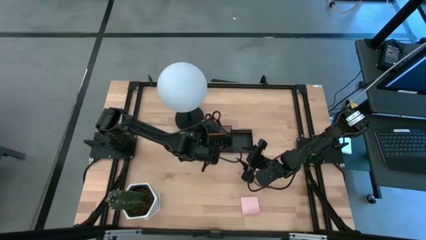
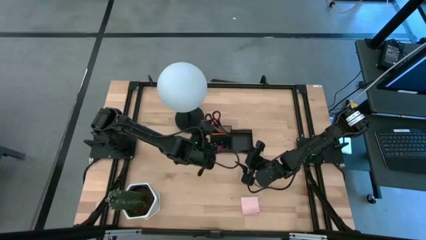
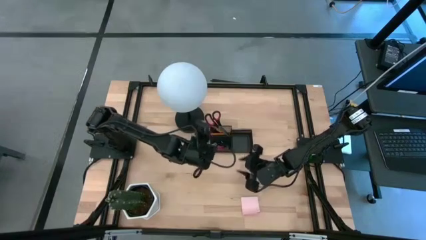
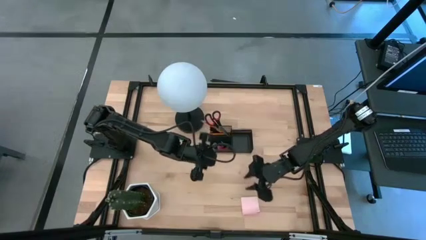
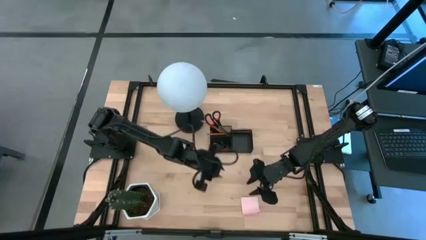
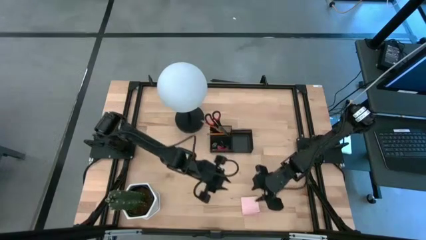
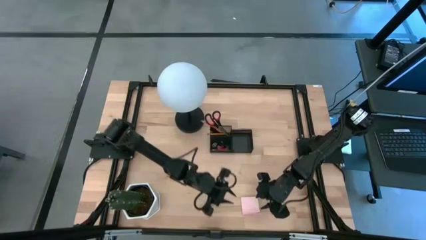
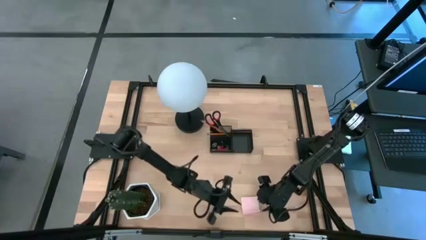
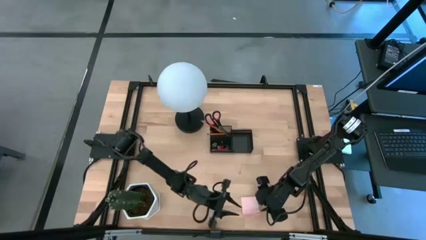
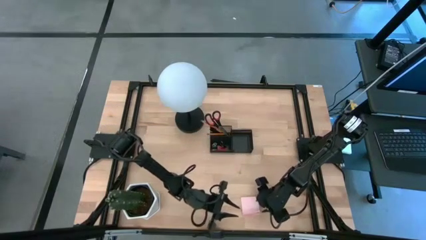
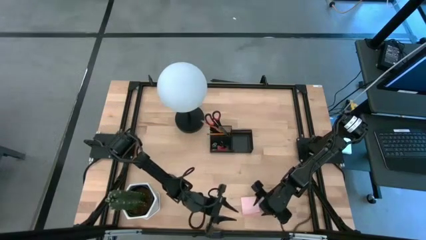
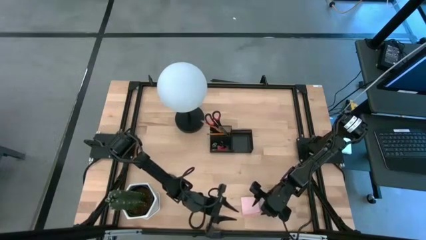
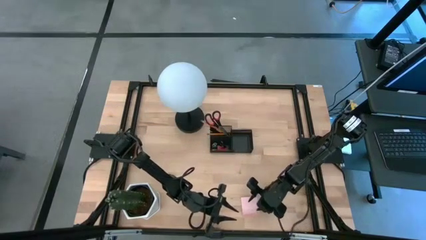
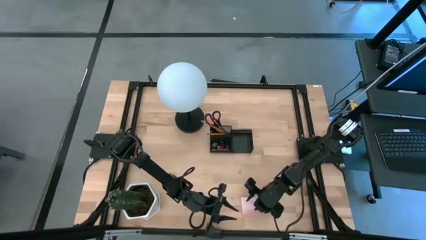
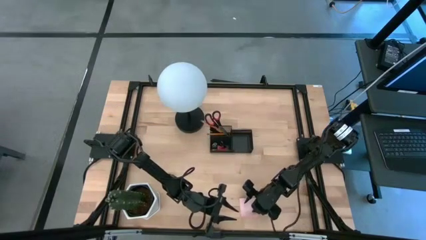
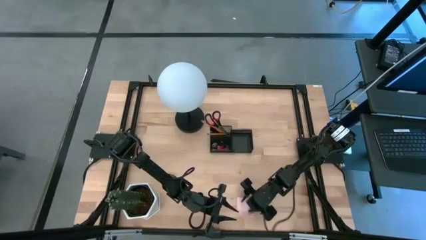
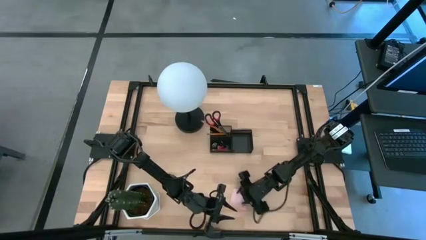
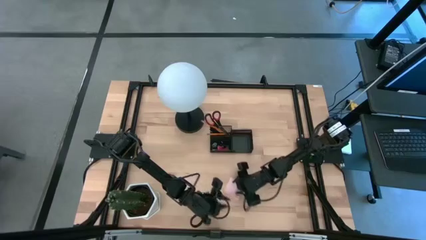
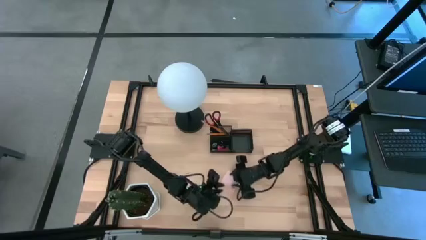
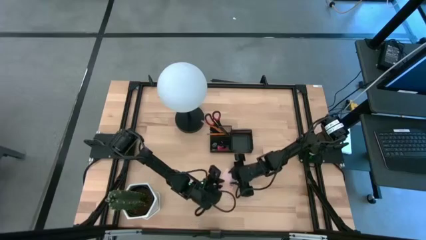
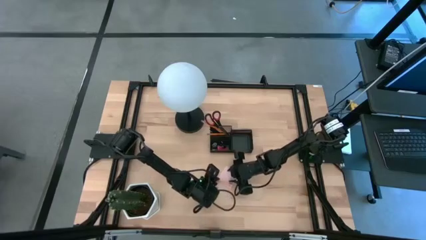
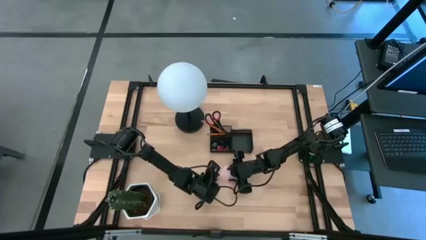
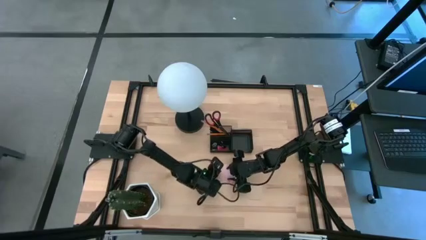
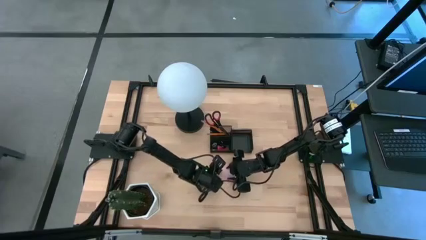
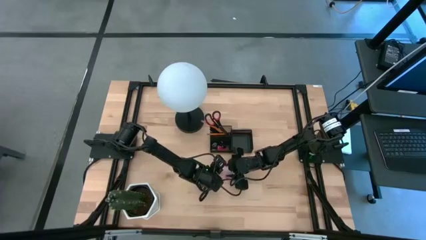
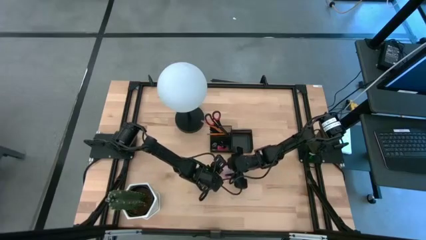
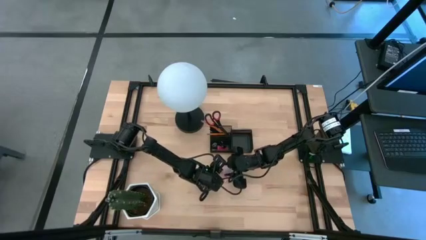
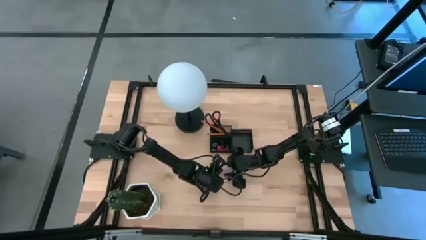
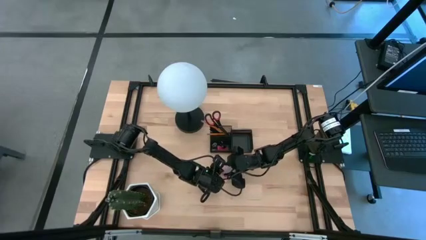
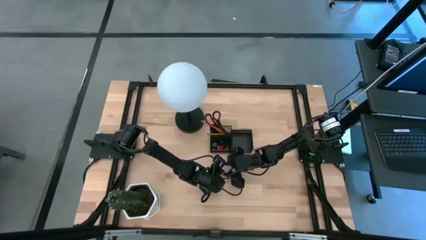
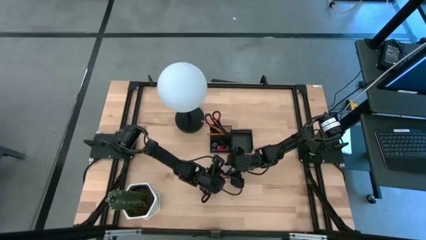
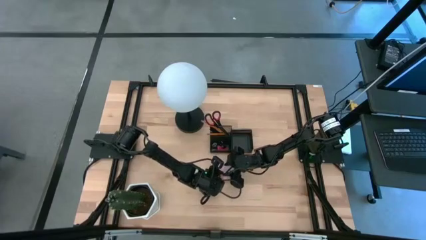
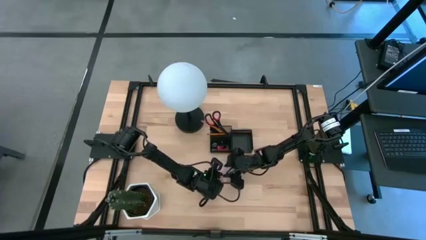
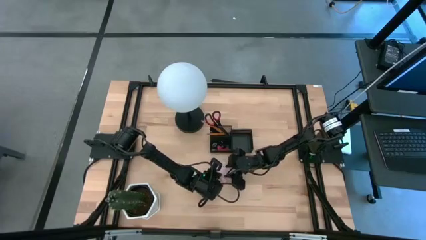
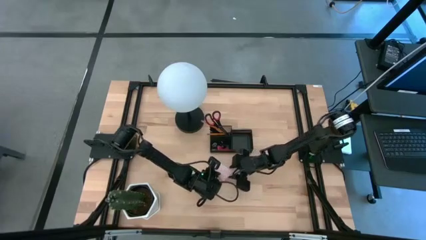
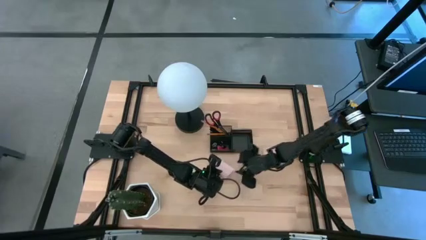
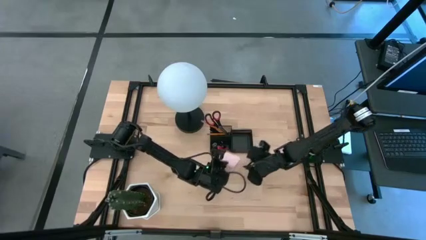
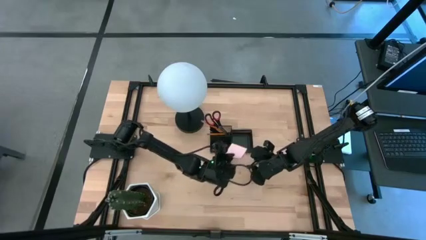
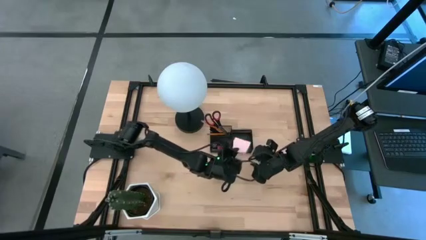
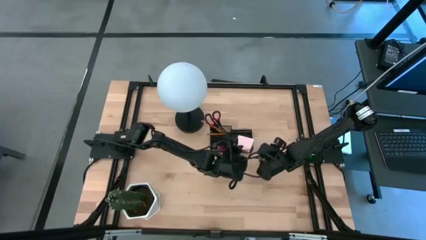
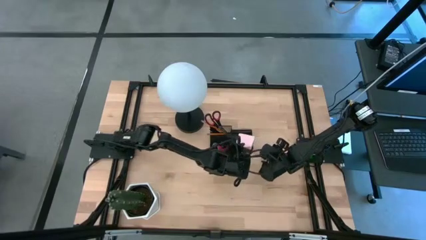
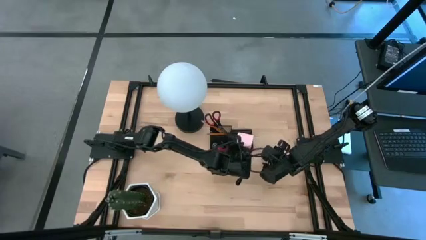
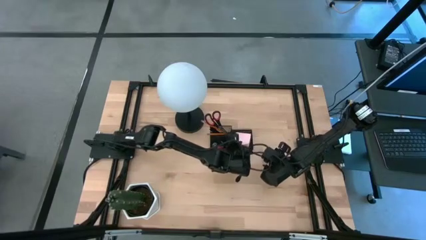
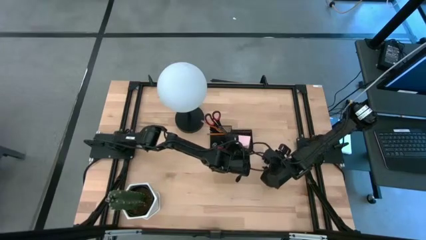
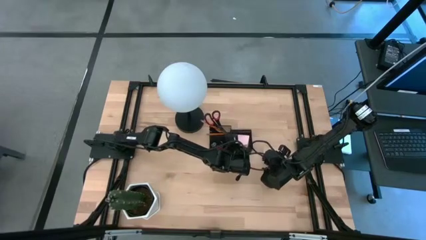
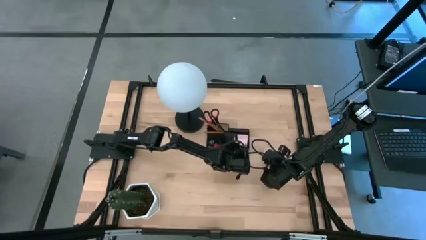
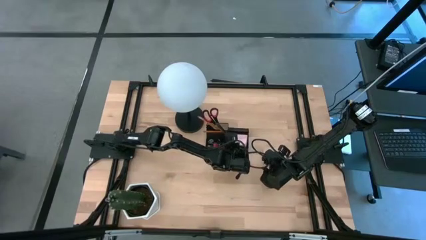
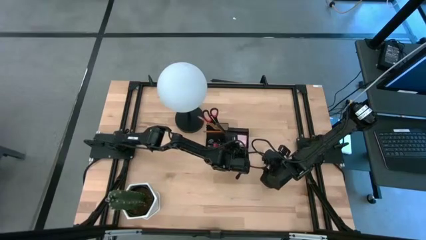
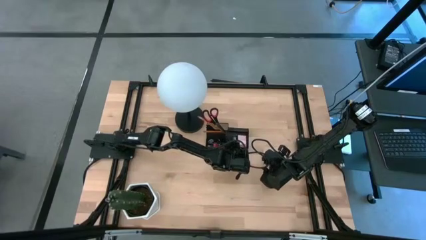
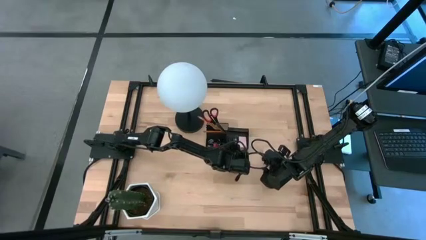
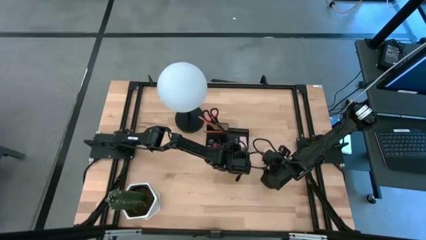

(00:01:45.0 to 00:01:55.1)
Task: Pick and place office supplies into organizer
Put the pink sticky note into the black desk organizer

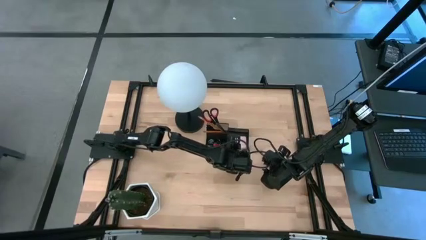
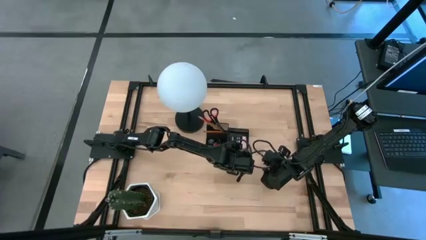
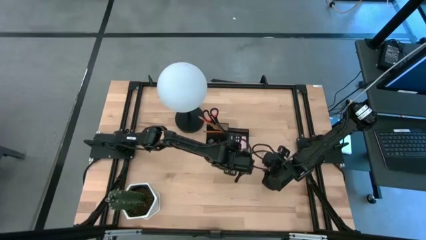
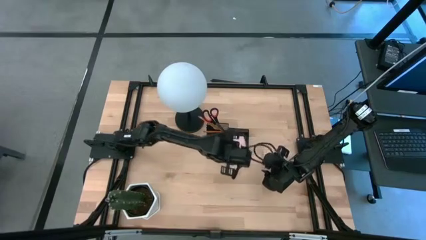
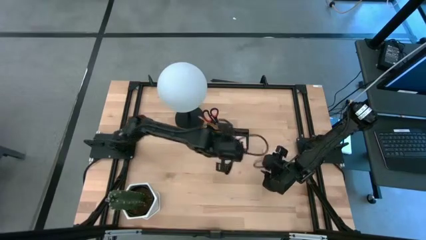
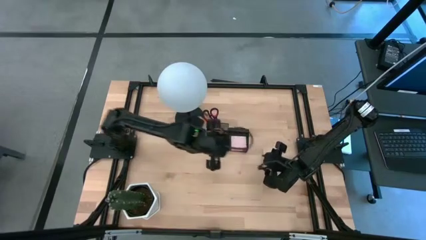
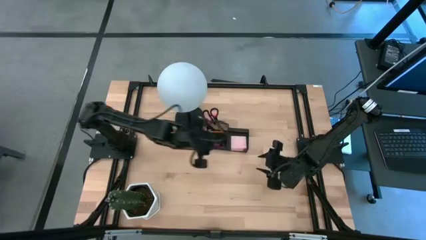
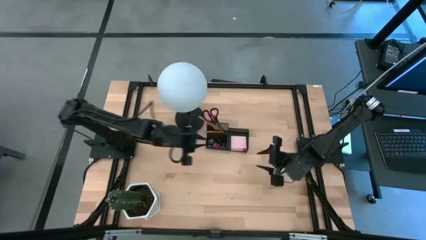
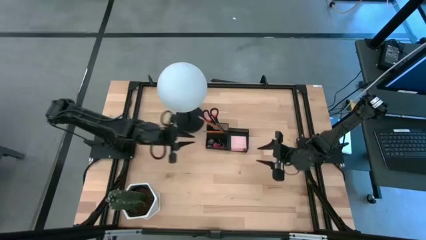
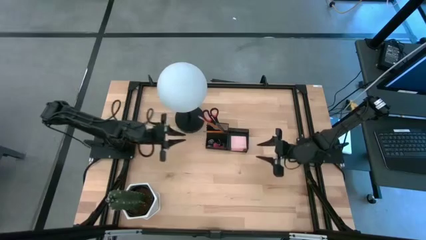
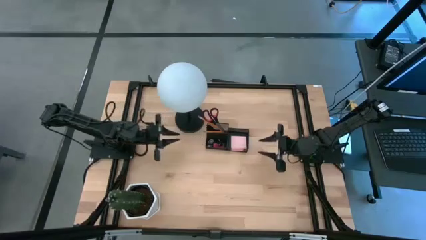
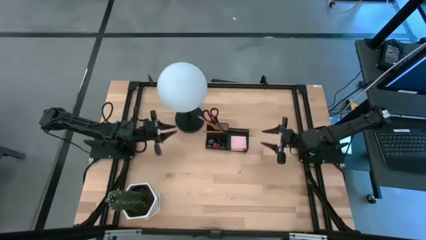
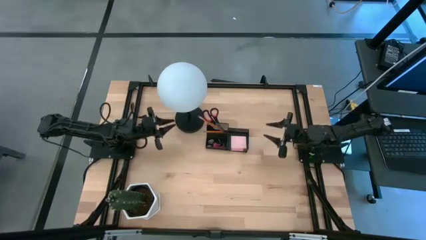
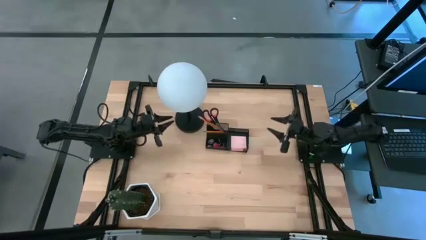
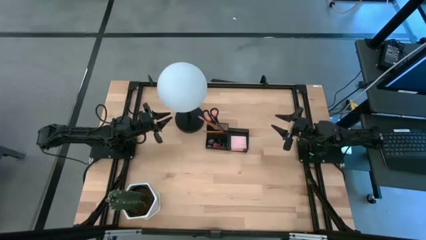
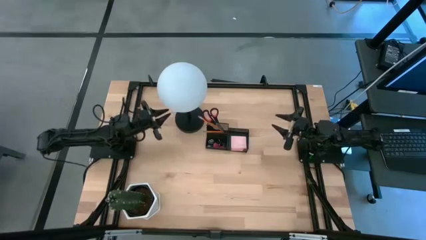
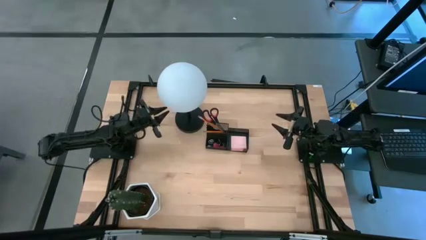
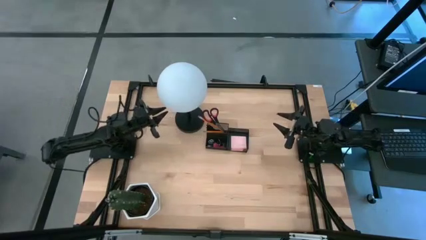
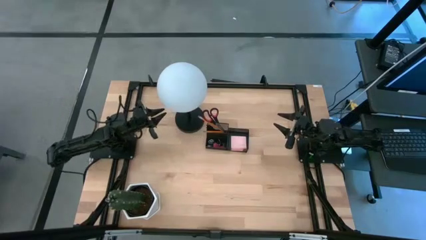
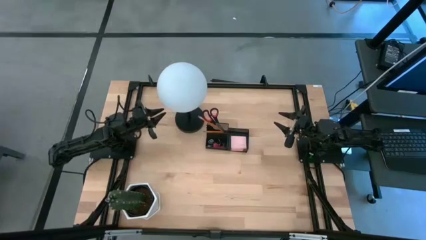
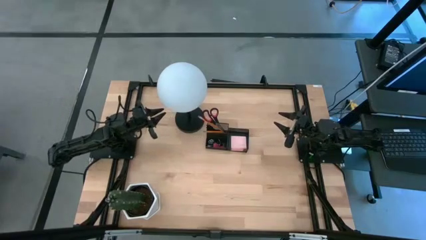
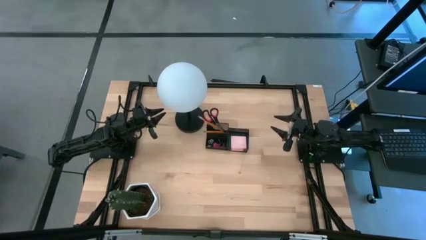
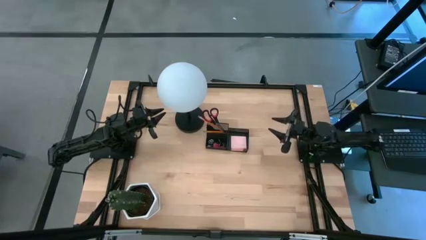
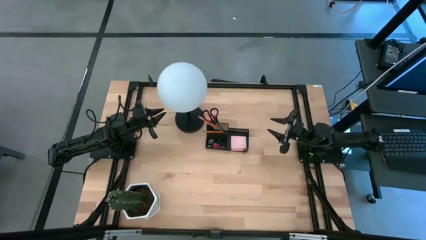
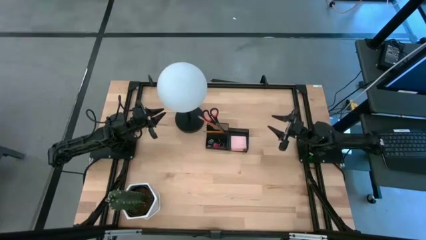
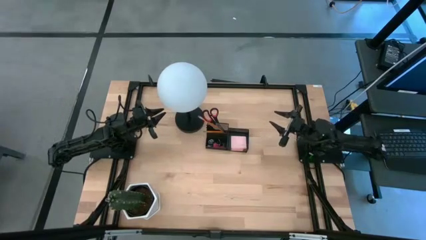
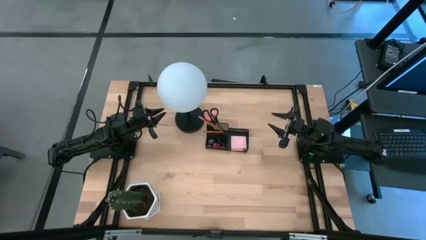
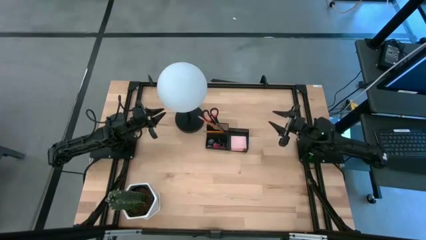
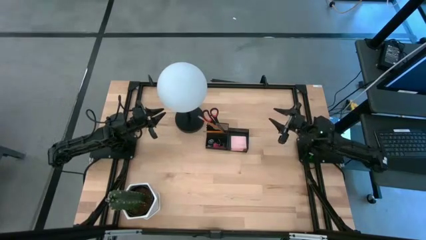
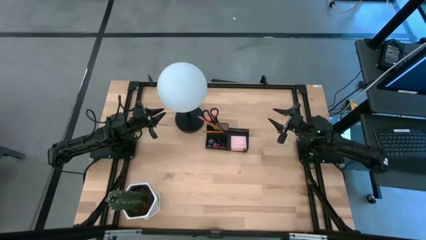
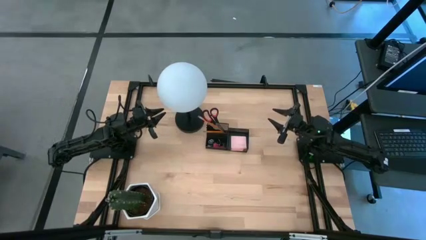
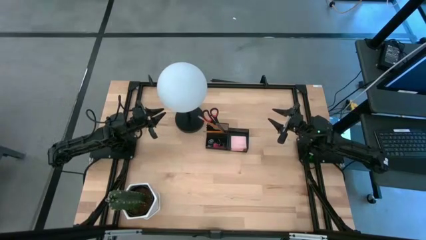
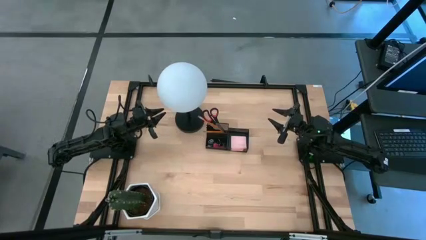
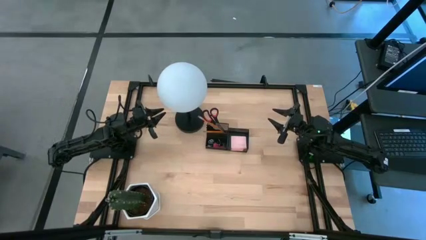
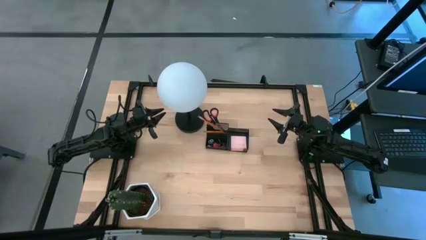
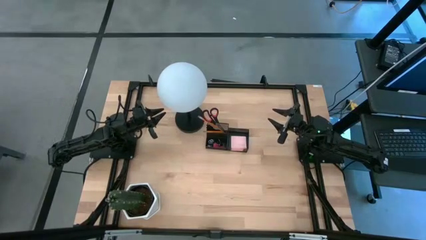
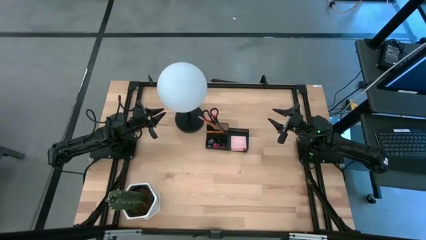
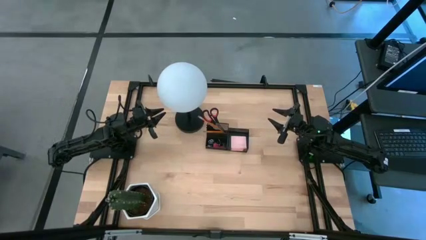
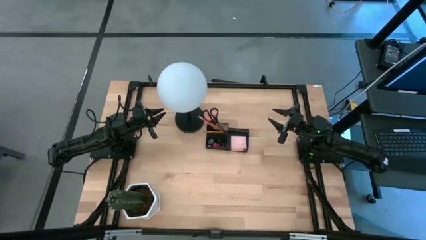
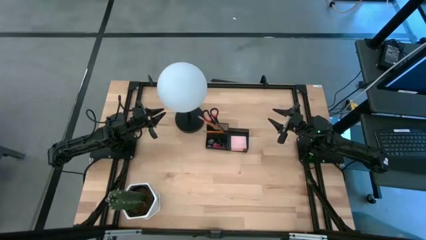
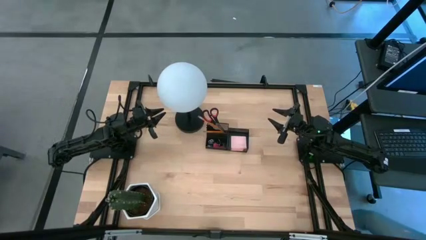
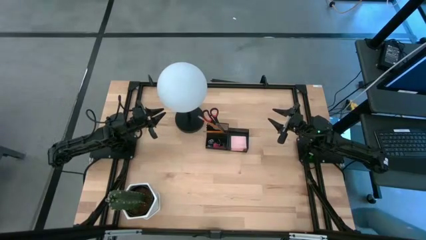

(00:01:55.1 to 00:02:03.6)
Return to Home Position
